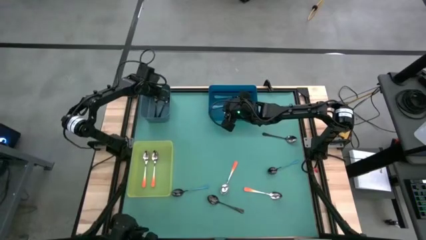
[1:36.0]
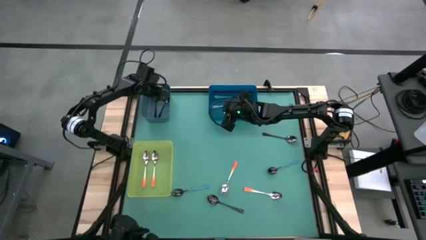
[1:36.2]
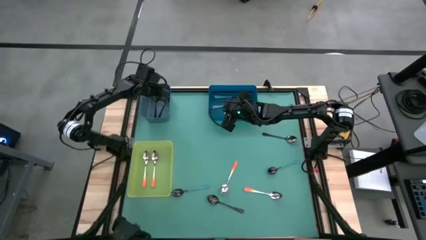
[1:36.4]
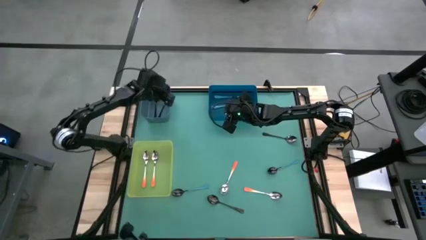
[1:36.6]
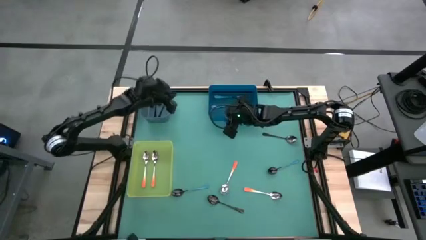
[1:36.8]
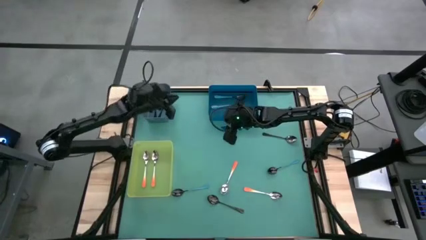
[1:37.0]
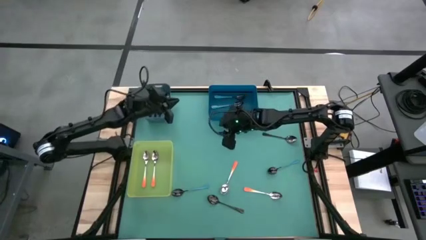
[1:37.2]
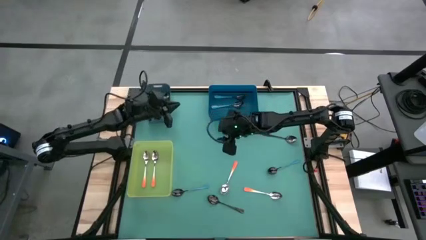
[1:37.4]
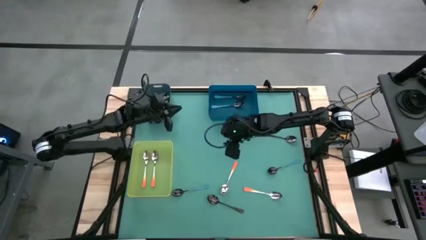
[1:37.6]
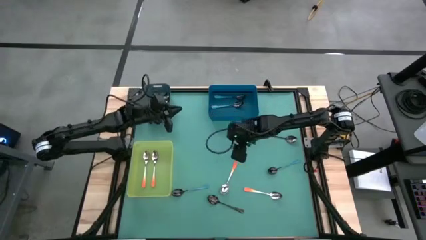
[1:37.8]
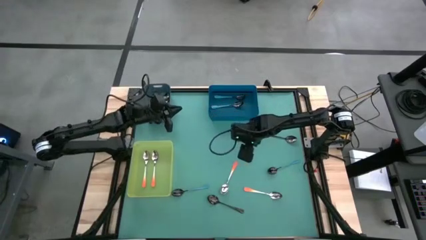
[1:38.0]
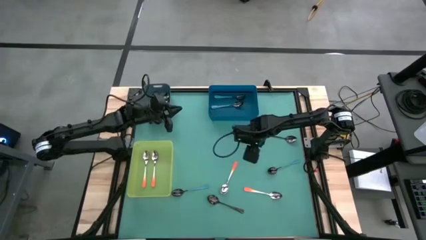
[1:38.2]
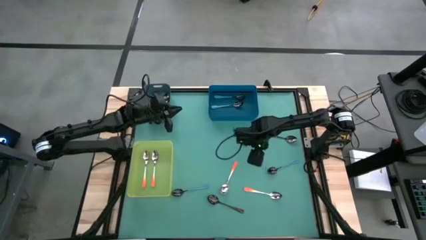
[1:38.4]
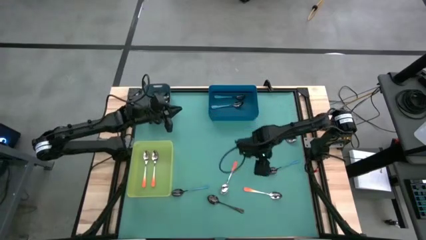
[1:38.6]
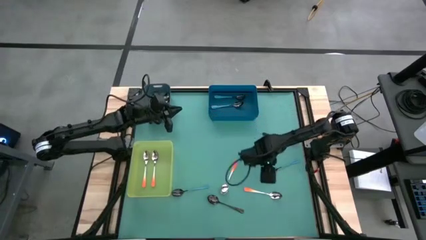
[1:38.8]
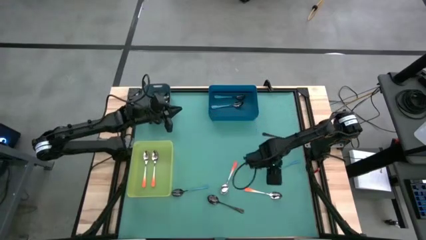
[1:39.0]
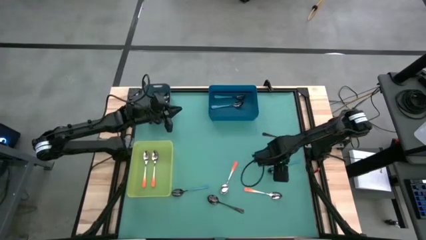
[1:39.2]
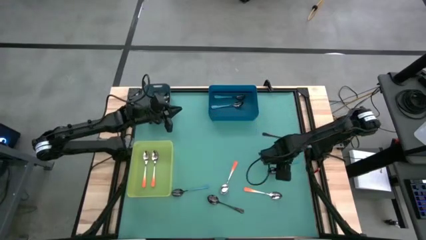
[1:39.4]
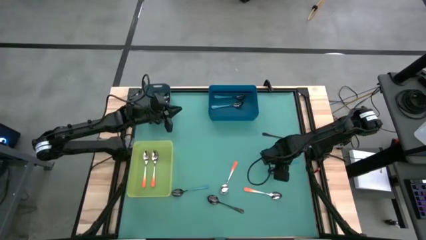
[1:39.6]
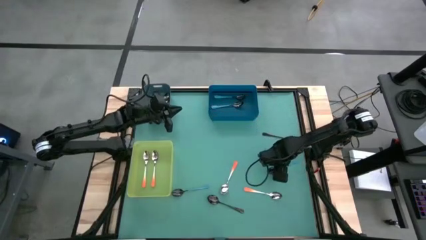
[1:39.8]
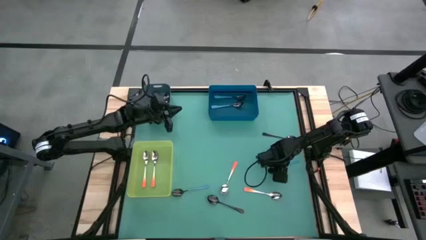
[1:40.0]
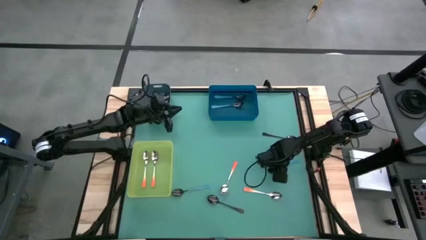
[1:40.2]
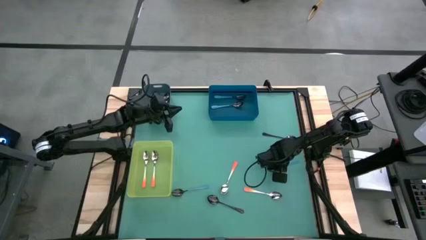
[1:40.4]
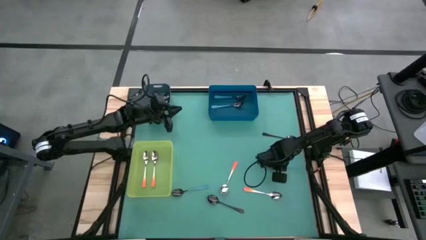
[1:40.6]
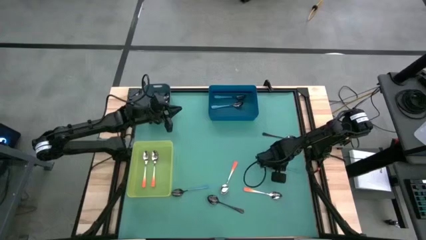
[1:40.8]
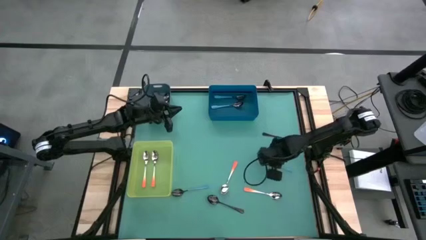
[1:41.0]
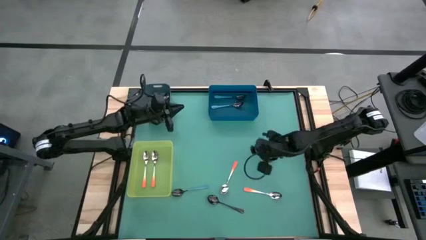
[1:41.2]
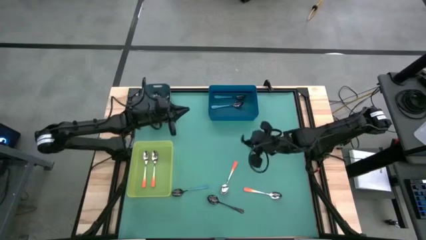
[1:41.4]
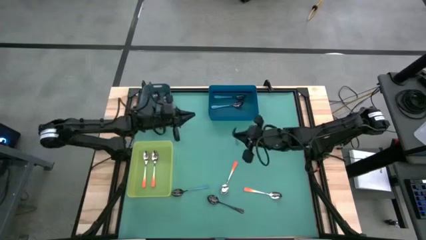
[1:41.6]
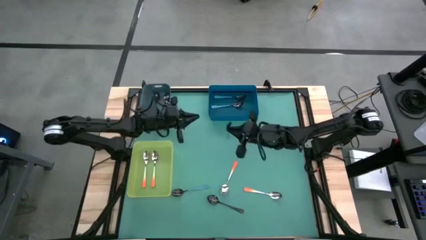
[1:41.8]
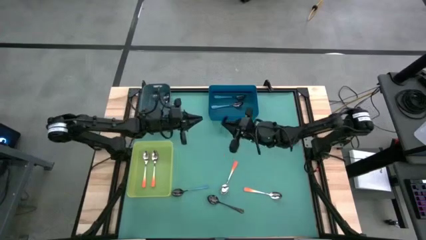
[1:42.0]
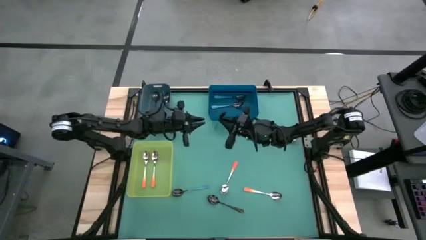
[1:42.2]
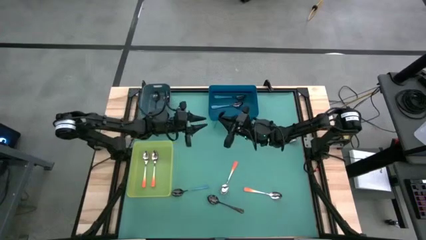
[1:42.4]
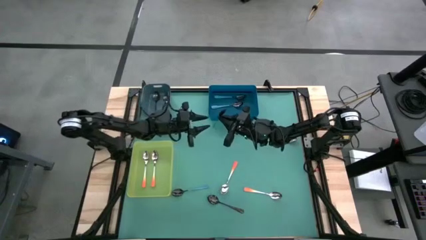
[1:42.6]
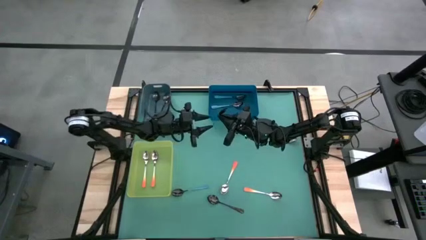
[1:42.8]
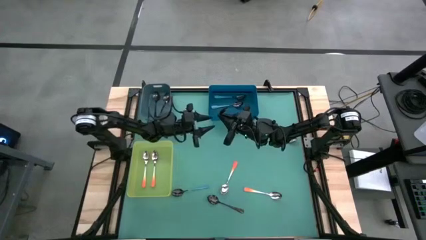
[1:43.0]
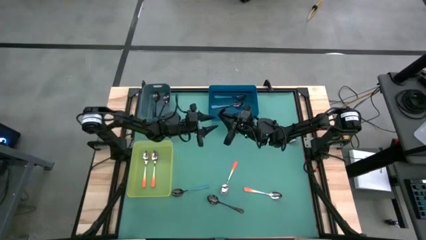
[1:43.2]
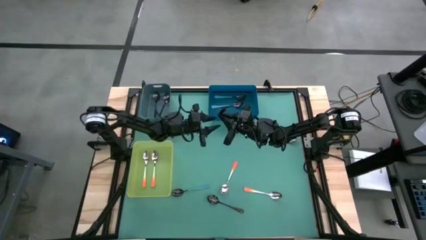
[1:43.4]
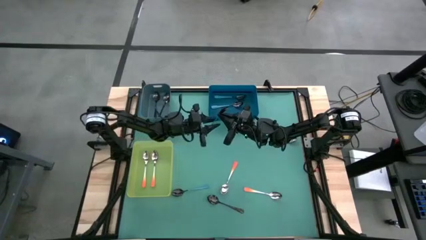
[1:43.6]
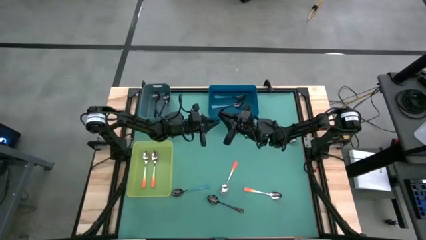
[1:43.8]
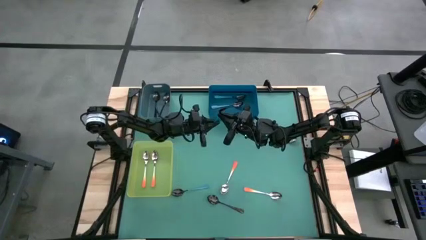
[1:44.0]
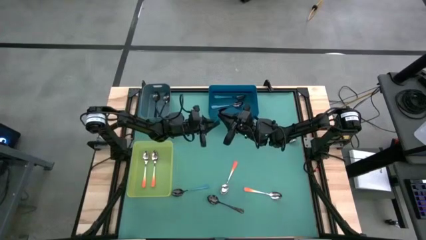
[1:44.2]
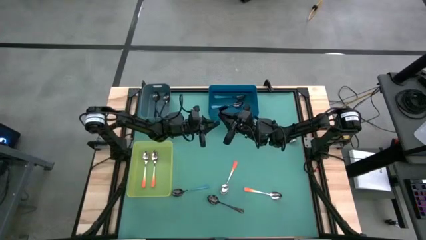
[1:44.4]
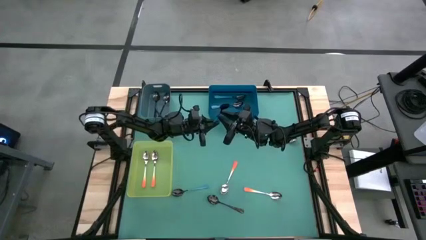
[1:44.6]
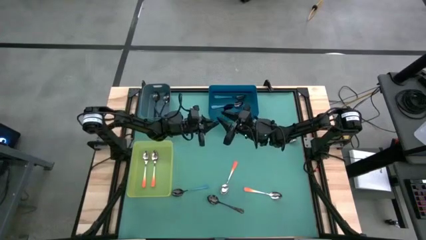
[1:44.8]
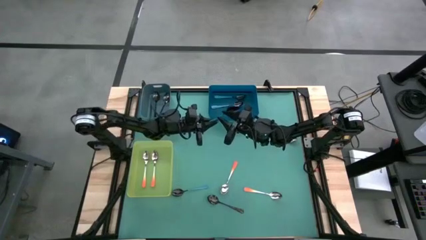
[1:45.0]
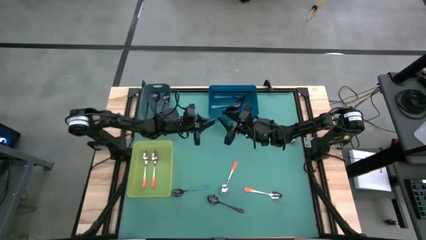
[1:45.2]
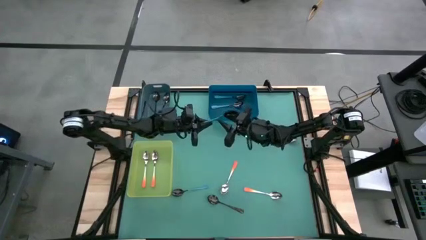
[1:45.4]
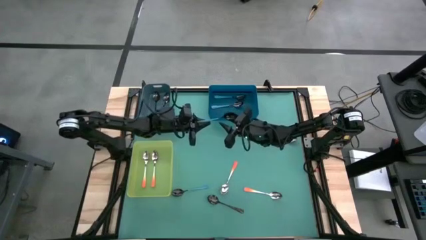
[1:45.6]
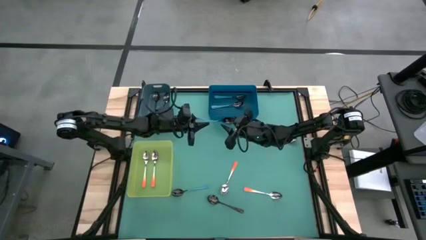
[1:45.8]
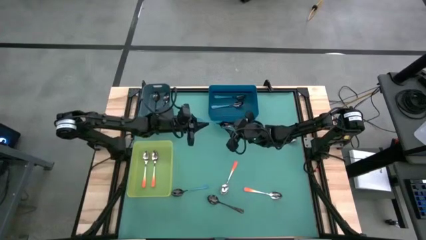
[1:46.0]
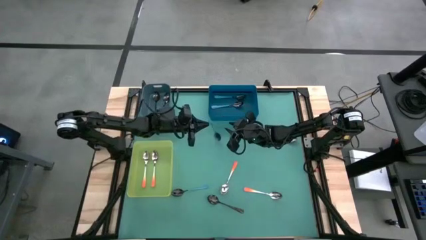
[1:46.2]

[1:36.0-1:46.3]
Task: Sort silverware by color (type)
Put the blue spoon into the dark blue bin

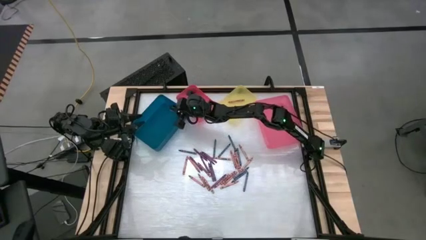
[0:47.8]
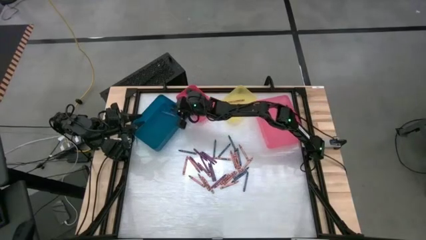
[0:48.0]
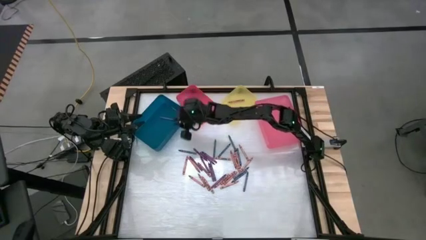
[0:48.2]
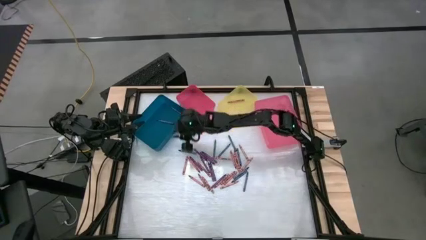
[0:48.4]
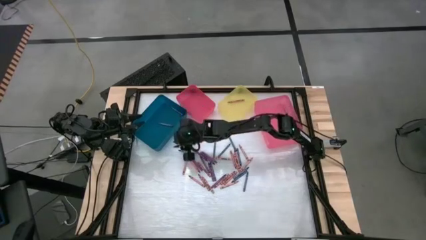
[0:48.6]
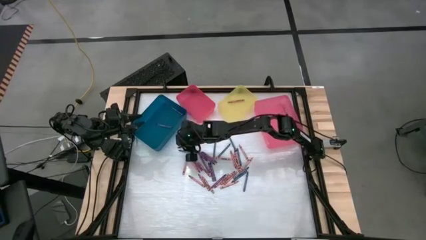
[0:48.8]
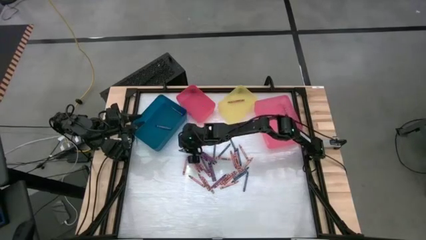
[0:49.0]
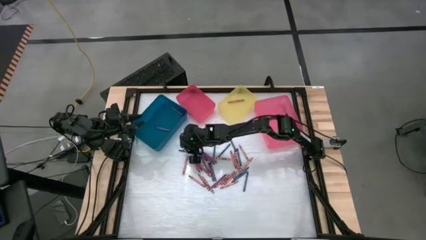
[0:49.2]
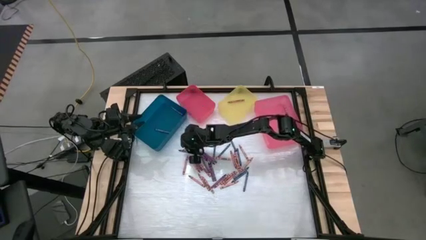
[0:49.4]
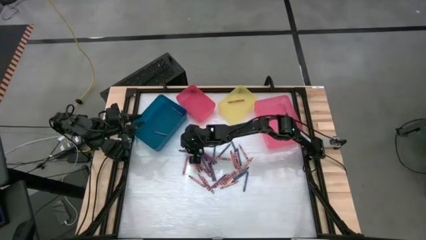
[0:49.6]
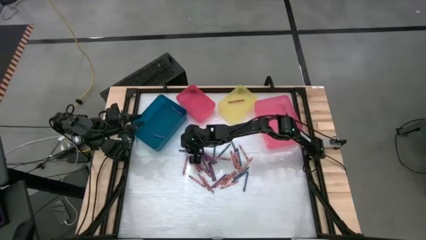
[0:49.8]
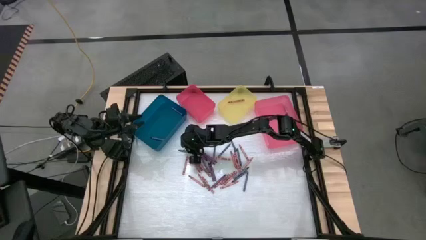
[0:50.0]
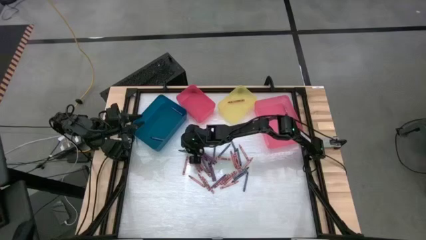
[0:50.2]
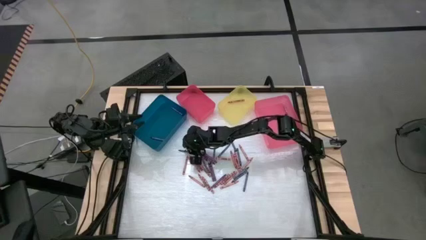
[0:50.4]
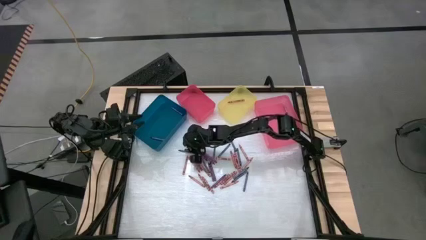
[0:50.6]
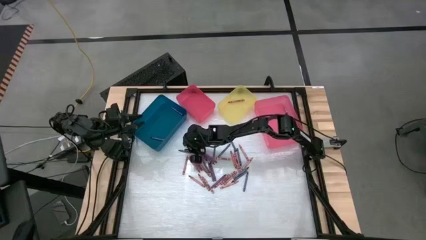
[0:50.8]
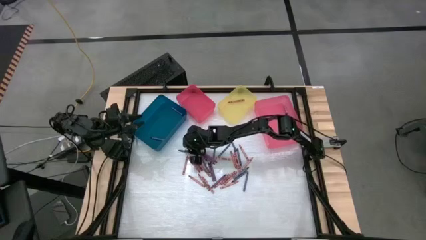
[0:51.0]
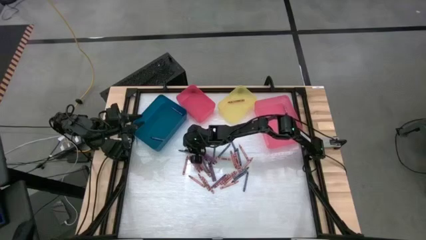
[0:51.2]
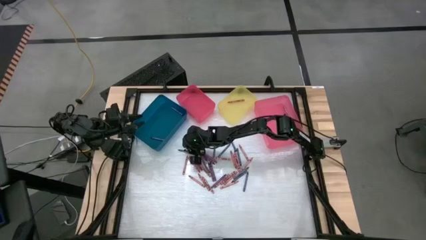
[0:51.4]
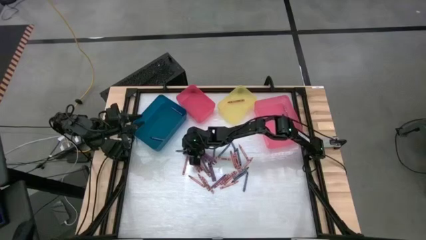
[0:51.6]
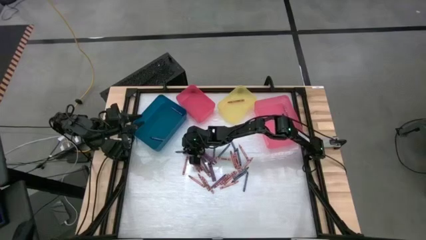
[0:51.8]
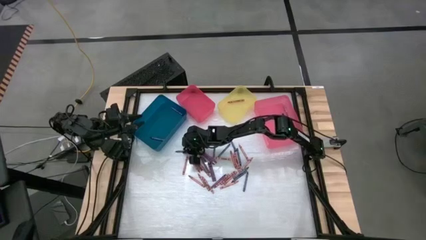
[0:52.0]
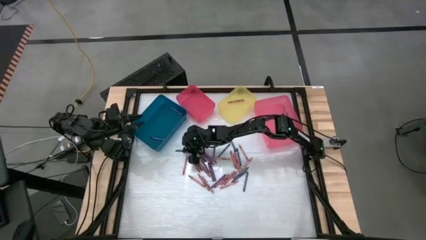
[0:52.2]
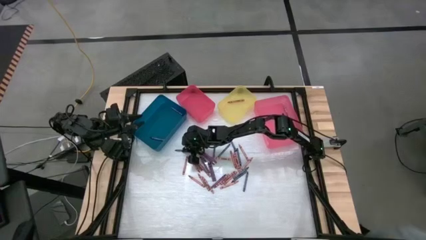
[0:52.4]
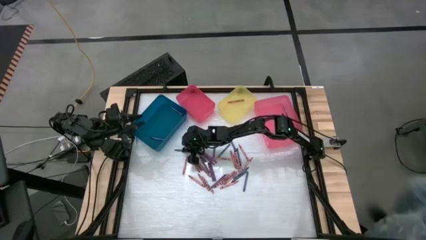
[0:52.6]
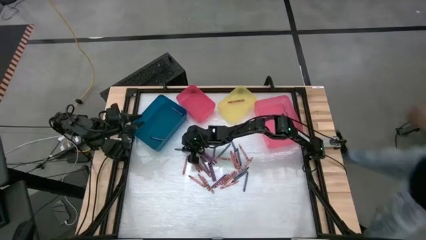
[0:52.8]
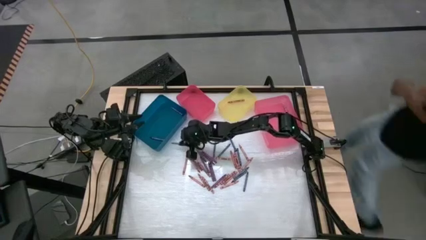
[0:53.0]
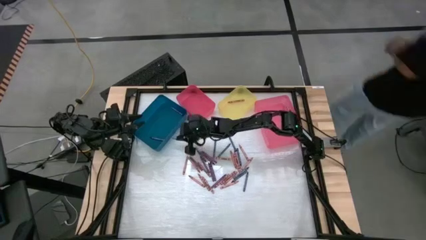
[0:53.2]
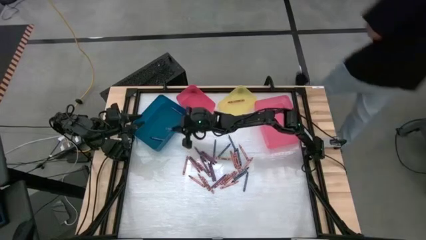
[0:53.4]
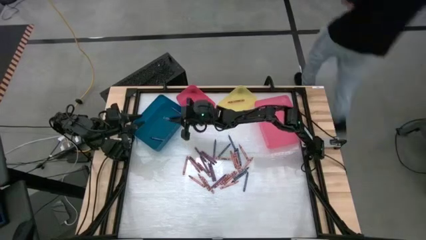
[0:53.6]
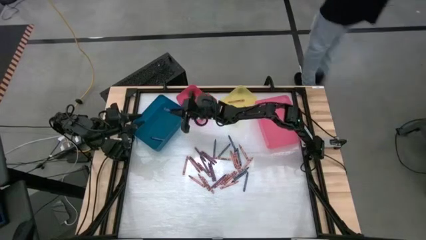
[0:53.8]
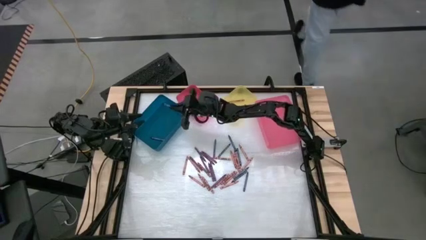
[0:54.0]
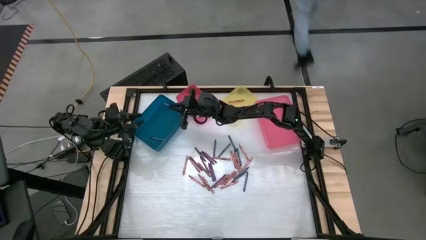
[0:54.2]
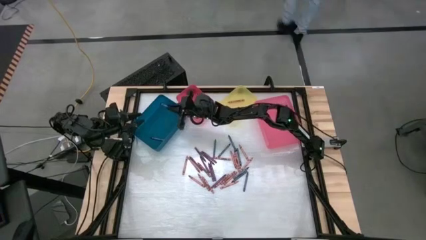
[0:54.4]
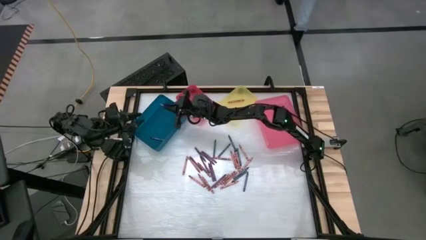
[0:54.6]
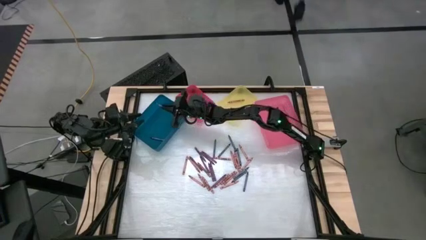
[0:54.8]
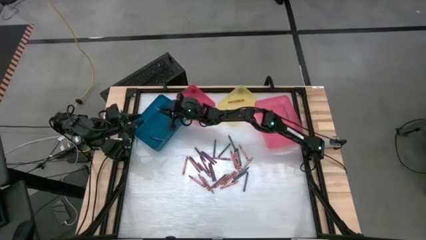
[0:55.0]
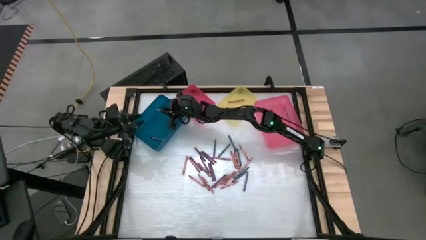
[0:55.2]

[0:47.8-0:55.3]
Task: Sort crayons
Put the blue crayon into the blue bin
